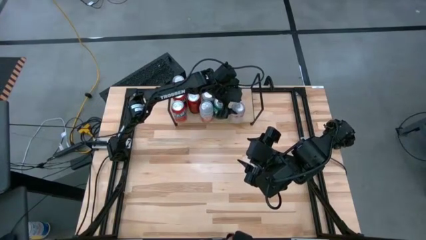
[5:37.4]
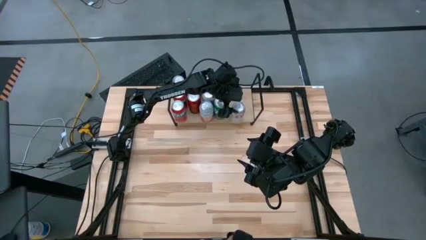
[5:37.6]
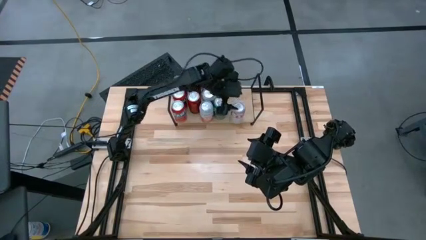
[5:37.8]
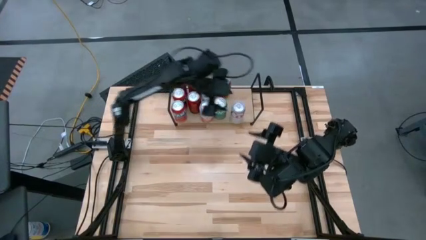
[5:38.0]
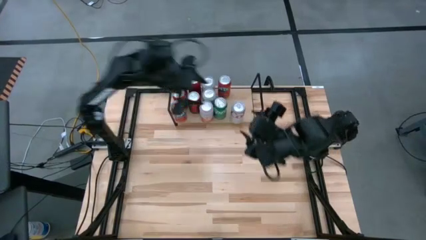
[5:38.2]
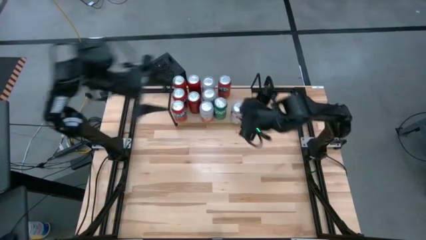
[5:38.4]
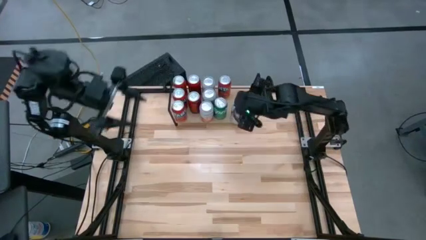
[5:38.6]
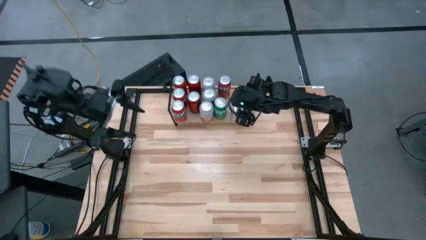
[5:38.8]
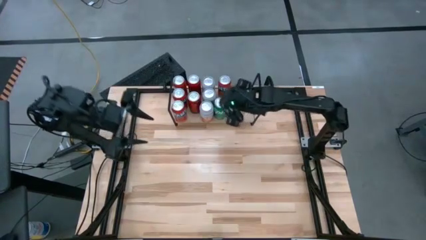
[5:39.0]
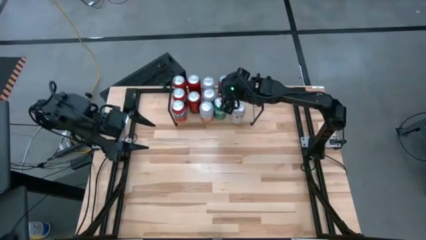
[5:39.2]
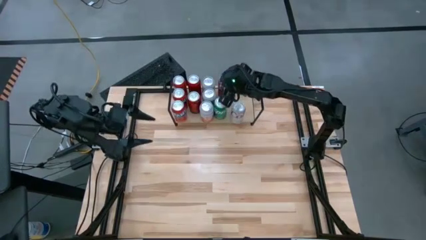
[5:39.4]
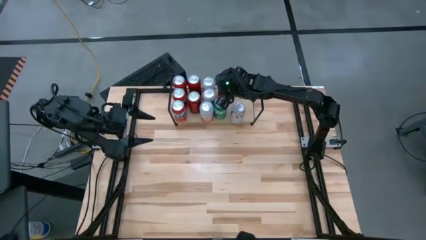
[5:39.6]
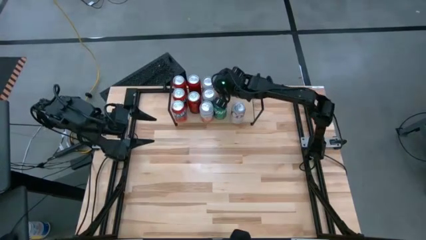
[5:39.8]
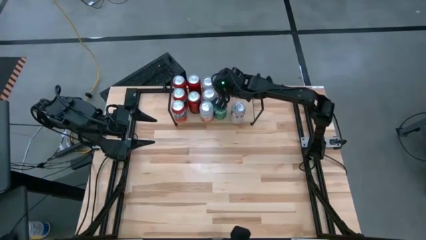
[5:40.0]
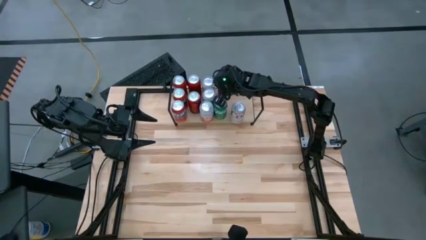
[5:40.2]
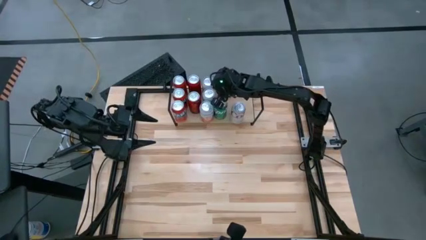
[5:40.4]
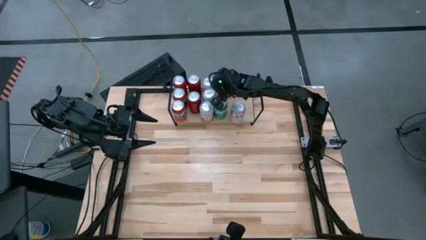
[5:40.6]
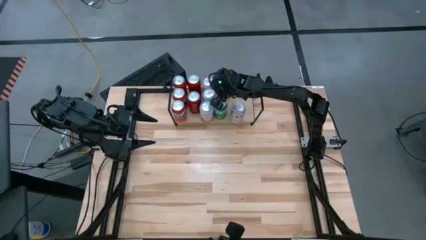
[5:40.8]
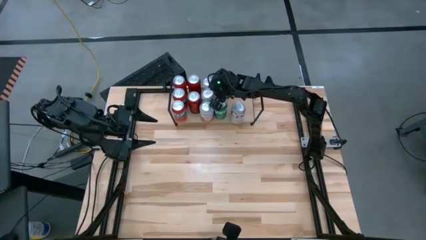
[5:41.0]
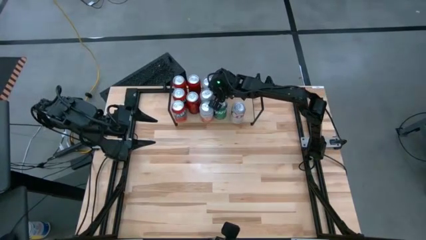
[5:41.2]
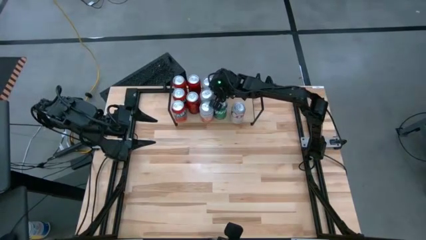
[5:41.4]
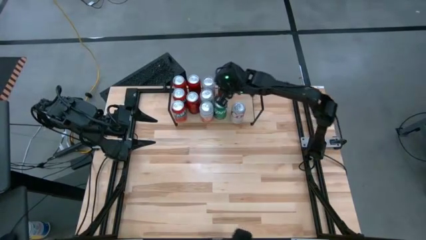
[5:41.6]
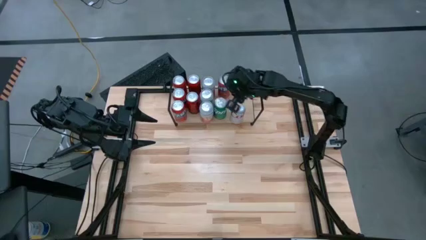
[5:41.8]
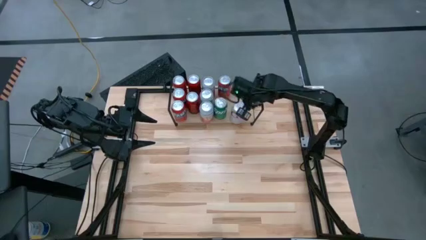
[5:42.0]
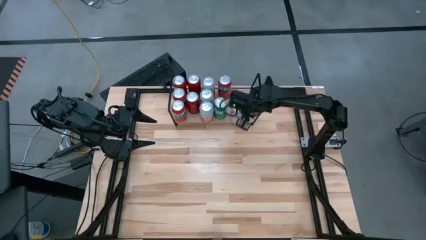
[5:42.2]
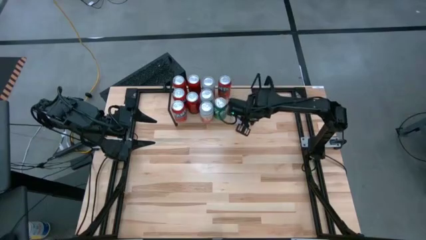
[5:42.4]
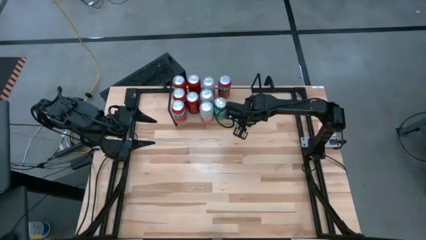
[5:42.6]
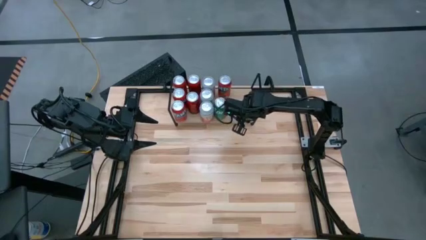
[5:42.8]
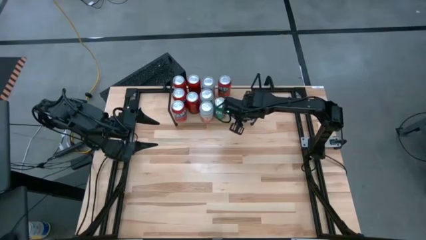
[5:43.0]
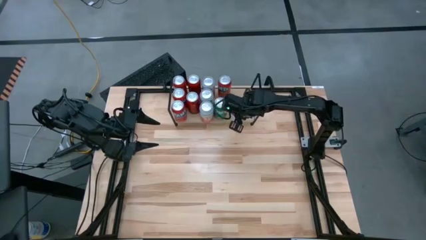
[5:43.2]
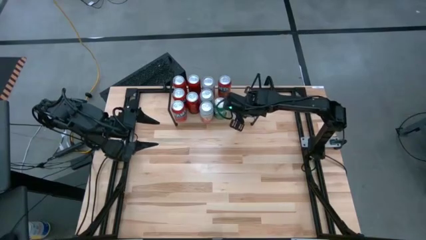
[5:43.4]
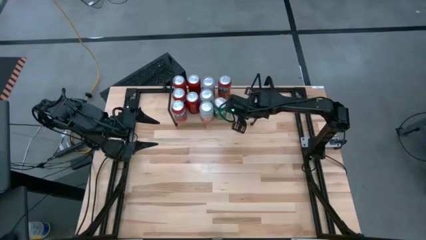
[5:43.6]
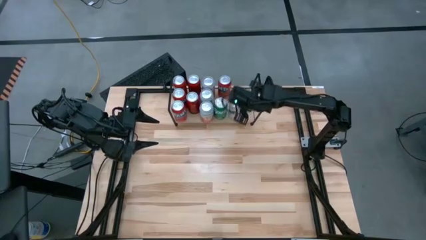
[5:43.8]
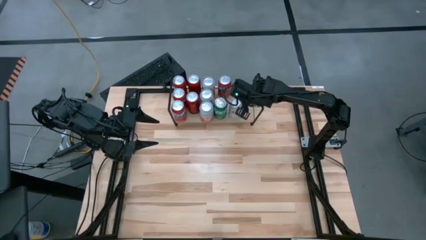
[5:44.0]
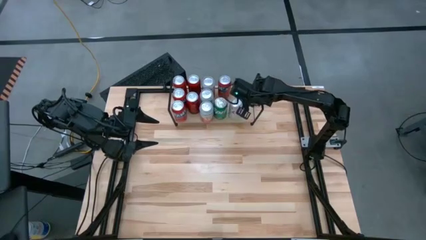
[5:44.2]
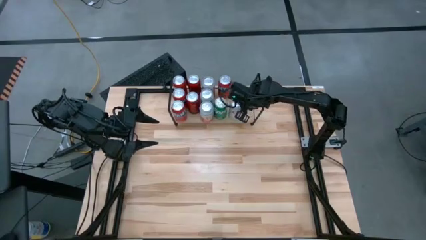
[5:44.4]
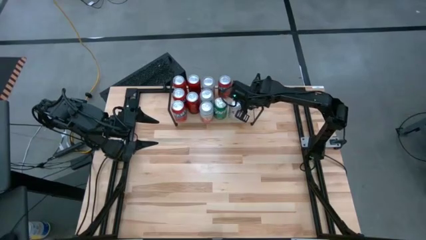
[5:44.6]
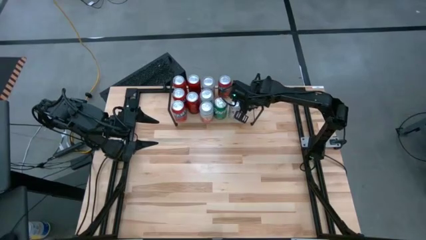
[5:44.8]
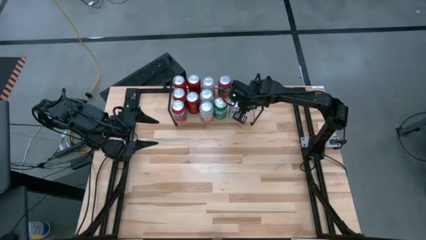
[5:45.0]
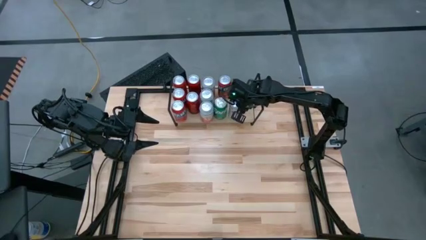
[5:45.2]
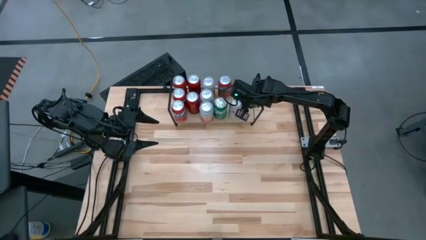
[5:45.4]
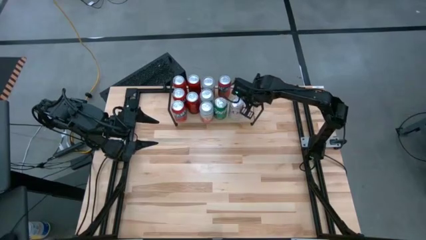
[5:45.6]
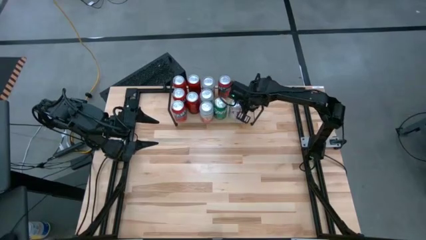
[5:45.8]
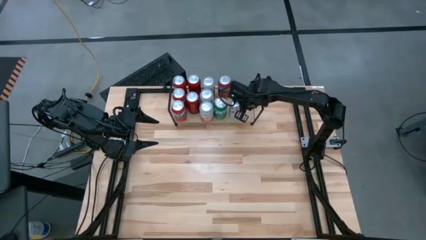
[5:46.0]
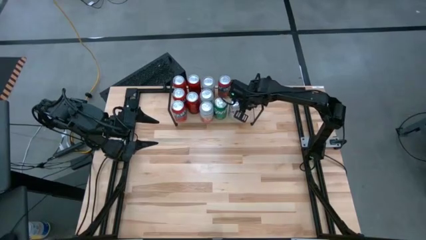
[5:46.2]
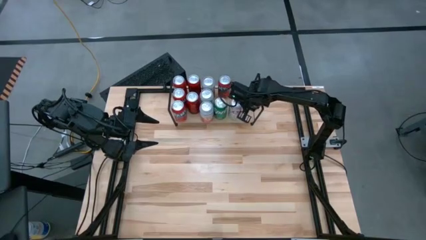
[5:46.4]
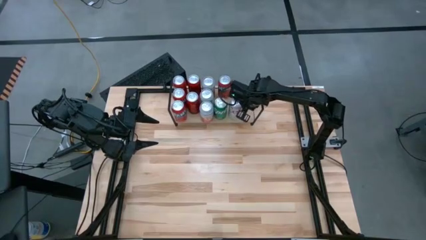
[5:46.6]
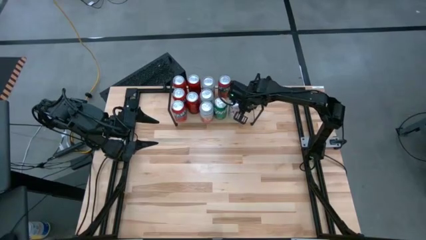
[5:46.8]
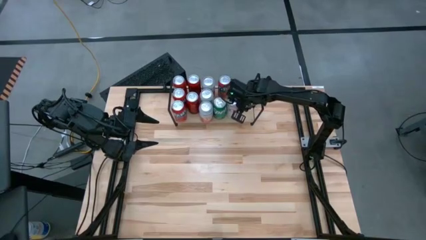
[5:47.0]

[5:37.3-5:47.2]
Task: Place canned beverage on shelf
Put the red silver soda can on the shelf

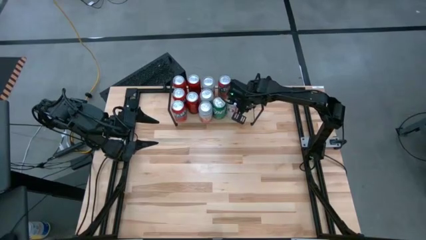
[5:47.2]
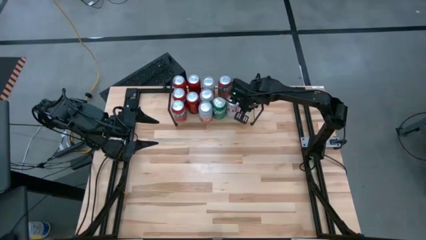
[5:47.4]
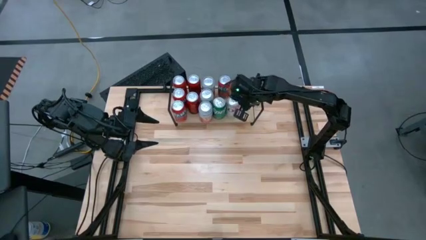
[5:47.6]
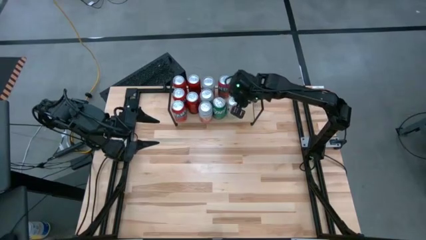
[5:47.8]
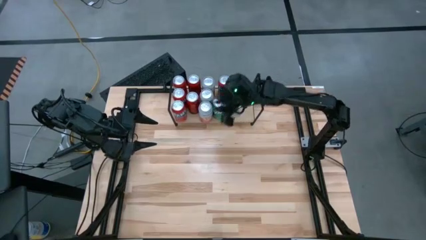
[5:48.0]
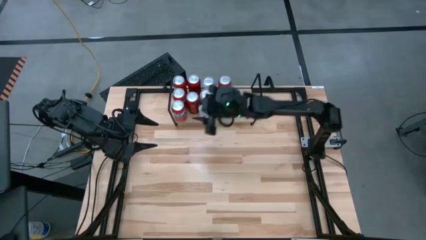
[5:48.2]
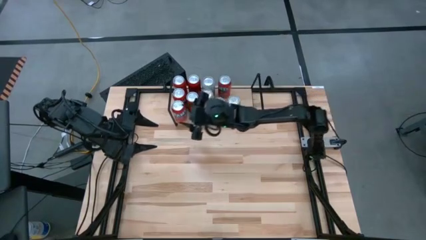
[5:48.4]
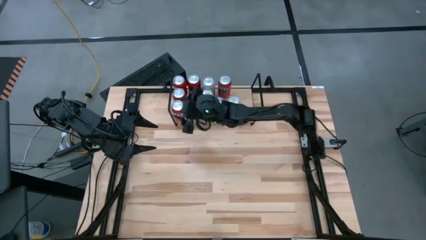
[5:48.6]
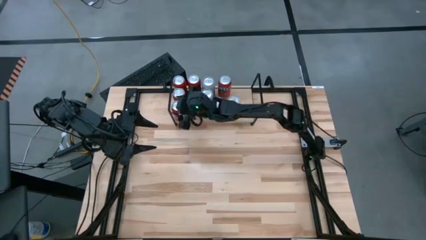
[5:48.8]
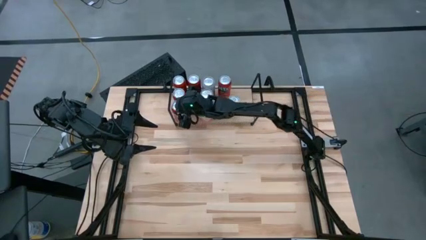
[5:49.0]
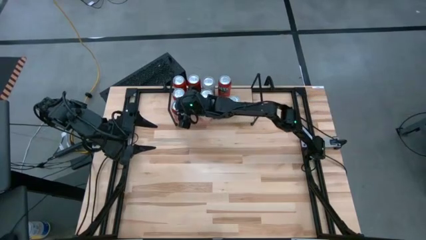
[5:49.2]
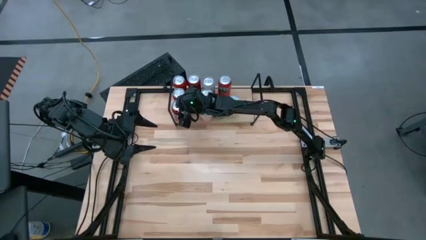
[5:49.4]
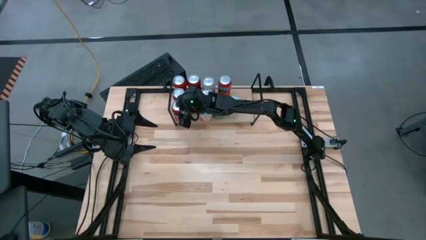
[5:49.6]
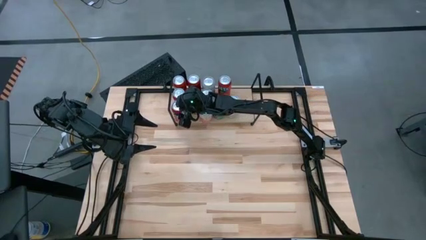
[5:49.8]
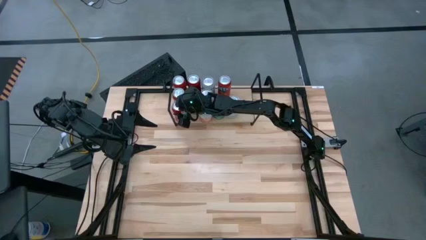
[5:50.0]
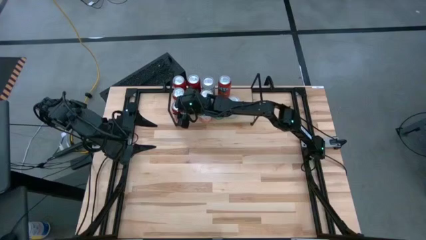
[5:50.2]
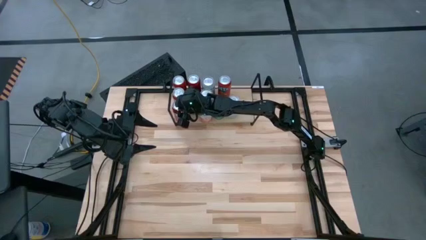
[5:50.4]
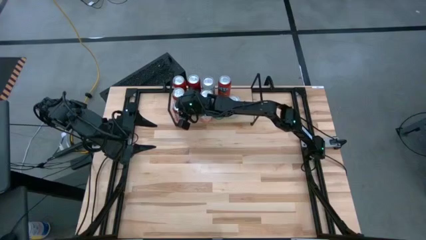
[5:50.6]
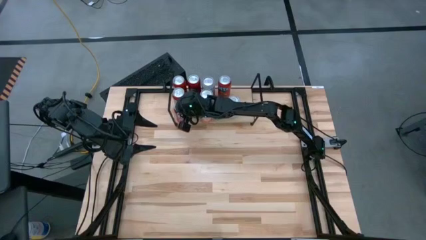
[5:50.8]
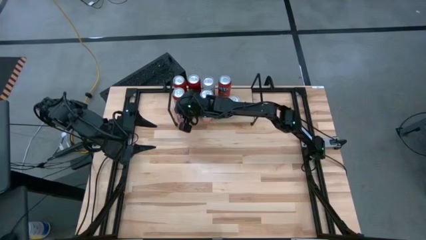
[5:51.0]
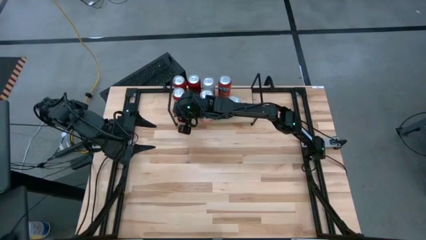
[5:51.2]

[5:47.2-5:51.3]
Adjust the soda cans on the shelf

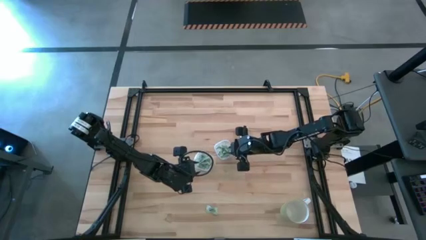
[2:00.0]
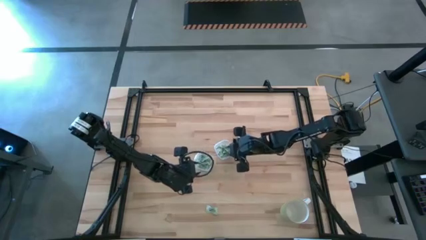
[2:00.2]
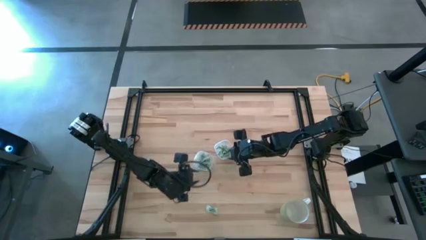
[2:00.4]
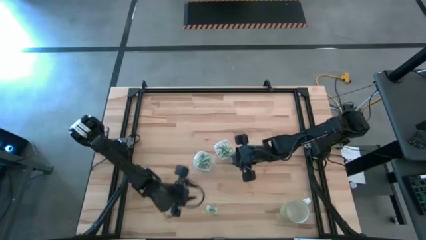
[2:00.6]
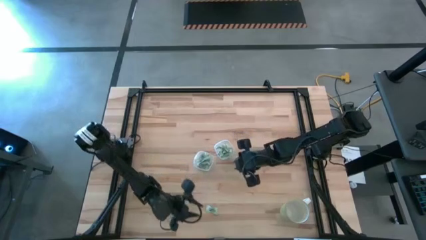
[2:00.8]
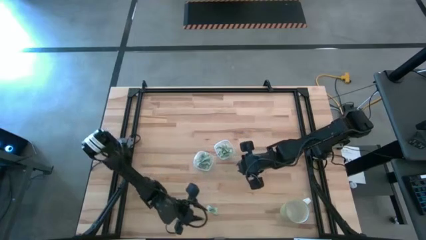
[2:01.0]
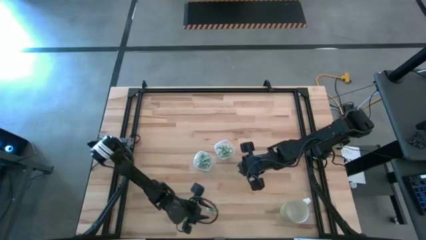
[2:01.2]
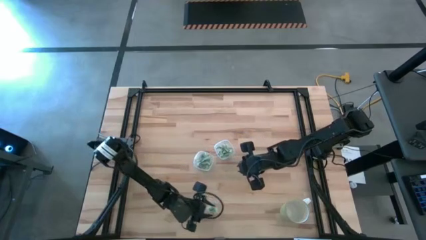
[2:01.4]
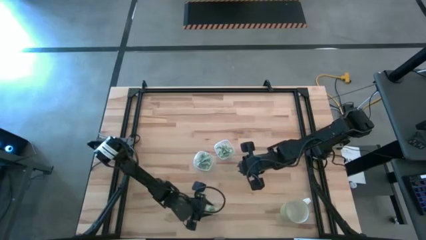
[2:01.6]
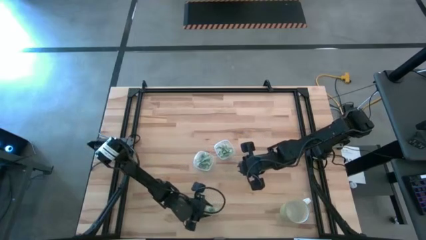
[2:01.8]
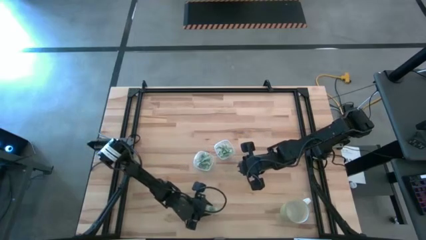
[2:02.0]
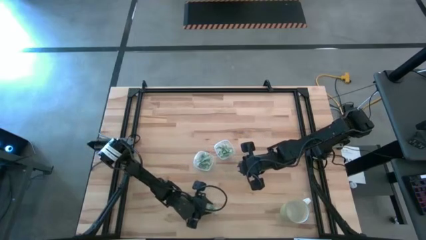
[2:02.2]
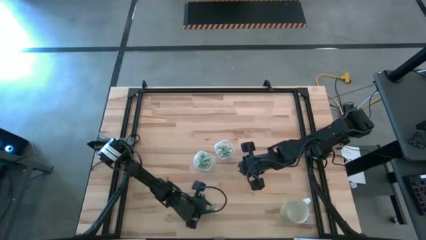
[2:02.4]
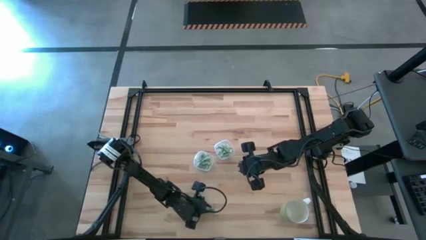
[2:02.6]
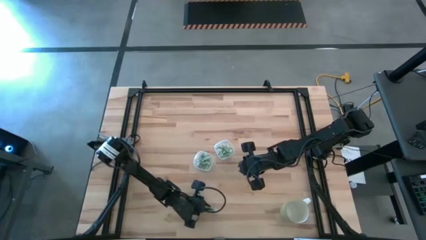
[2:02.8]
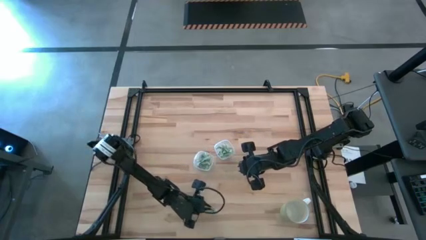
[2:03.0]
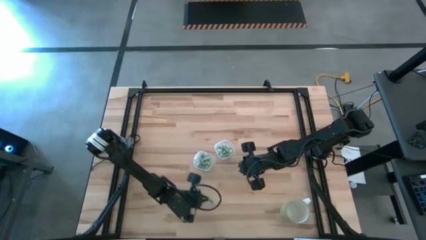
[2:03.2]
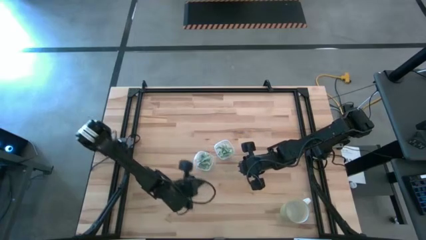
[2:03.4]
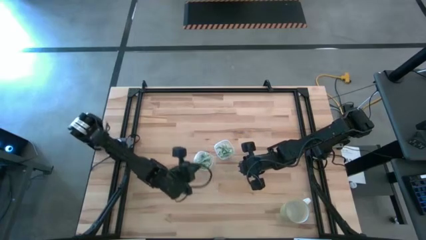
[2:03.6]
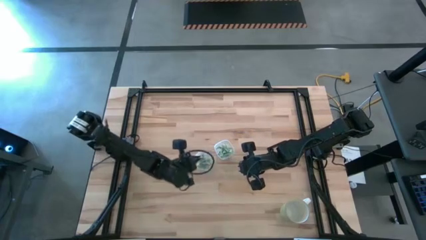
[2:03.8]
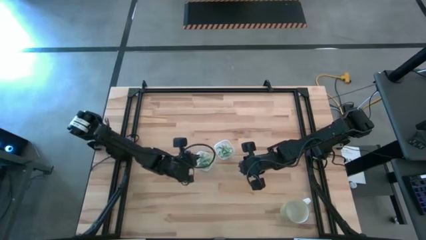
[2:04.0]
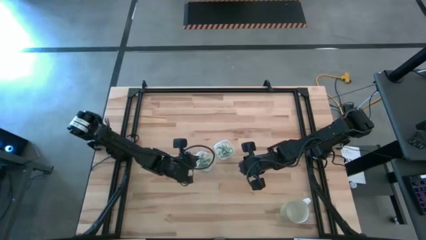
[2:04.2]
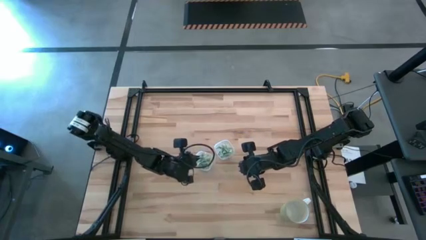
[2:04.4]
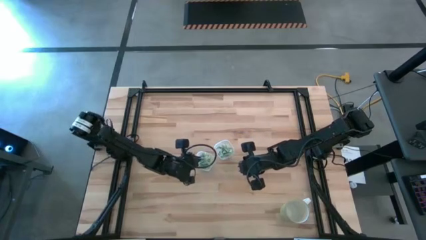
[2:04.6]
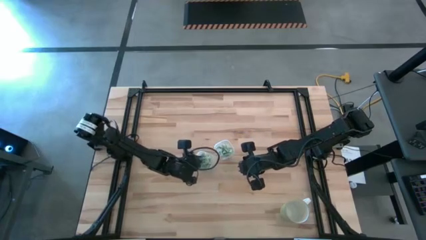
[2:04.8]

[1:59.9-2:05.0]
Task: Pick and place items into bin
Put the stevia packet into the left bin
